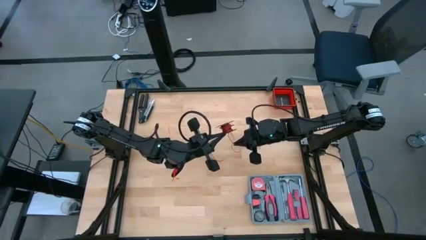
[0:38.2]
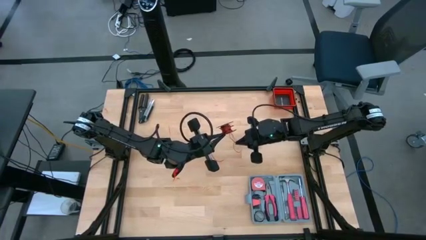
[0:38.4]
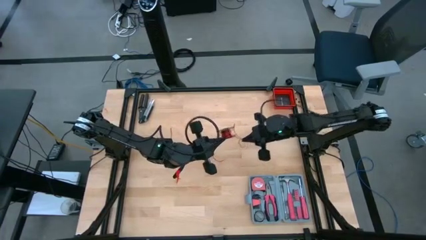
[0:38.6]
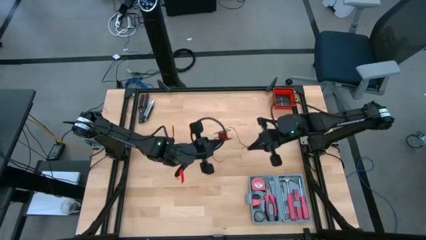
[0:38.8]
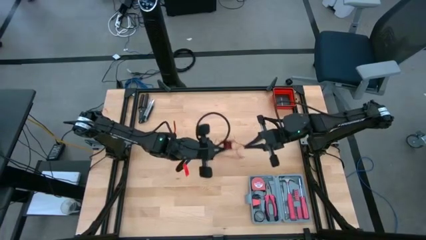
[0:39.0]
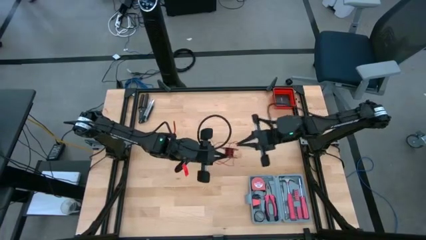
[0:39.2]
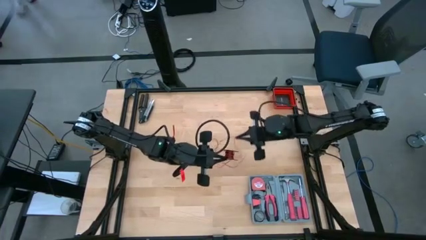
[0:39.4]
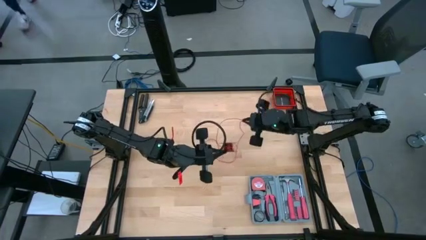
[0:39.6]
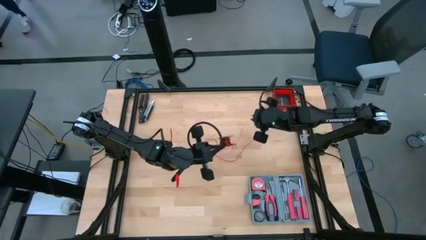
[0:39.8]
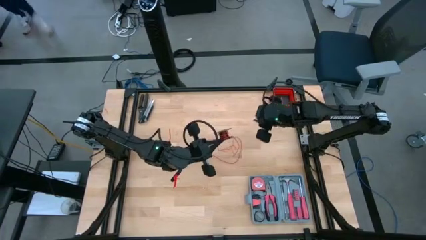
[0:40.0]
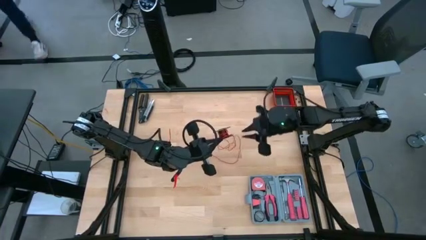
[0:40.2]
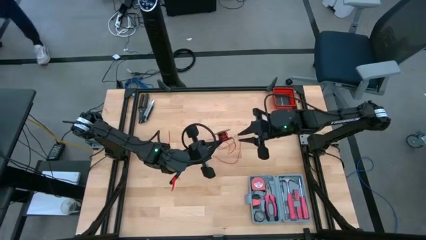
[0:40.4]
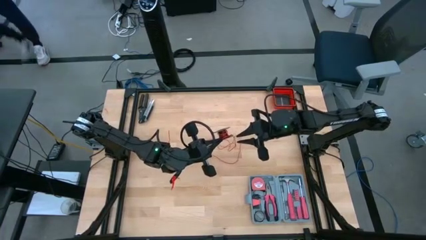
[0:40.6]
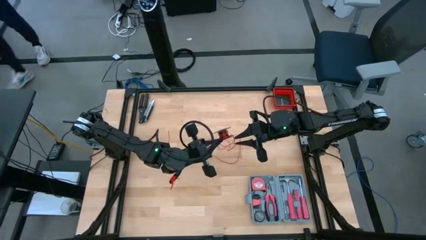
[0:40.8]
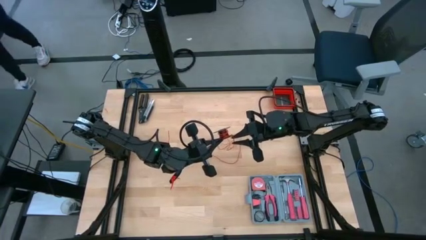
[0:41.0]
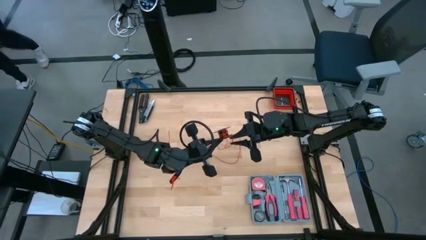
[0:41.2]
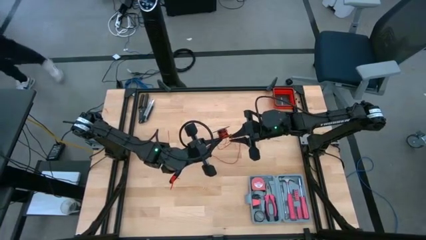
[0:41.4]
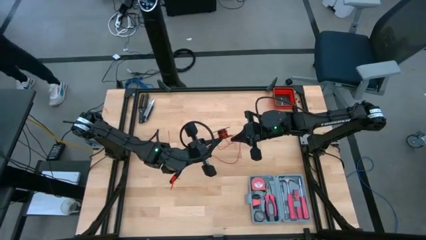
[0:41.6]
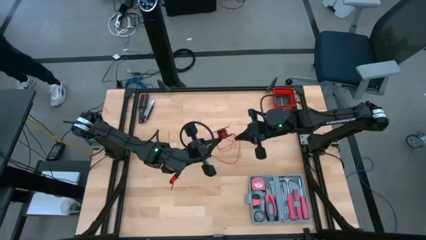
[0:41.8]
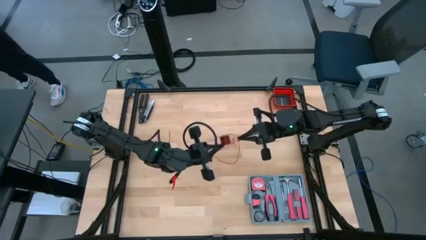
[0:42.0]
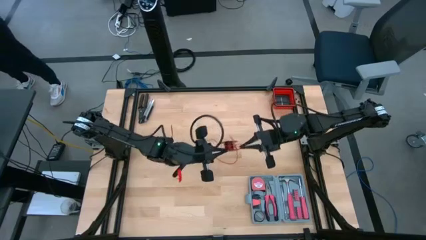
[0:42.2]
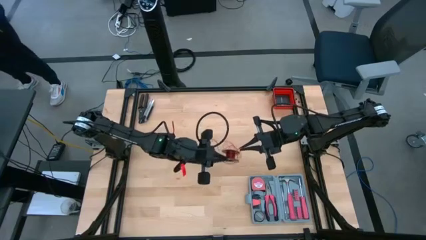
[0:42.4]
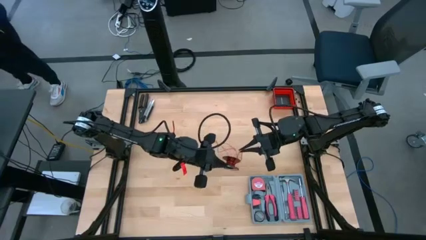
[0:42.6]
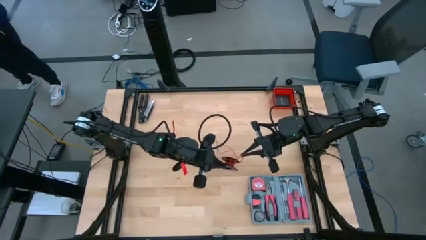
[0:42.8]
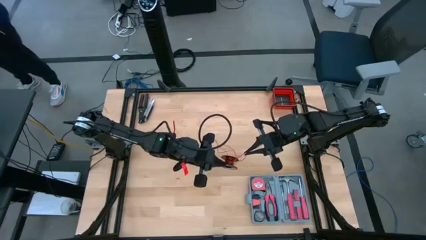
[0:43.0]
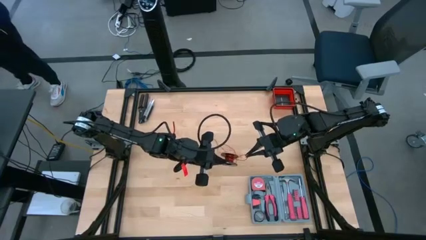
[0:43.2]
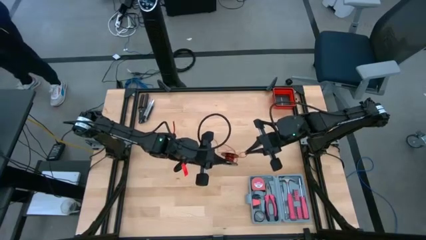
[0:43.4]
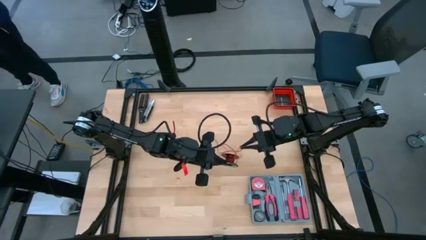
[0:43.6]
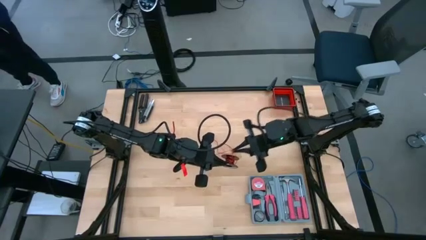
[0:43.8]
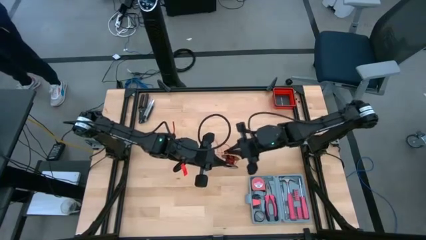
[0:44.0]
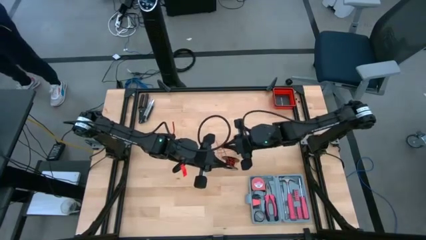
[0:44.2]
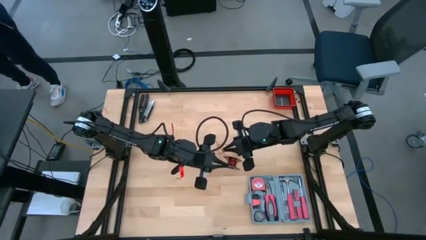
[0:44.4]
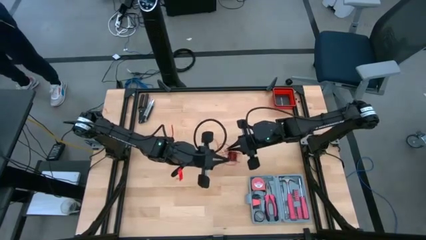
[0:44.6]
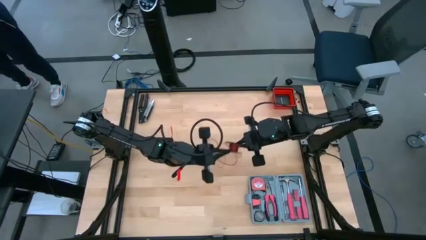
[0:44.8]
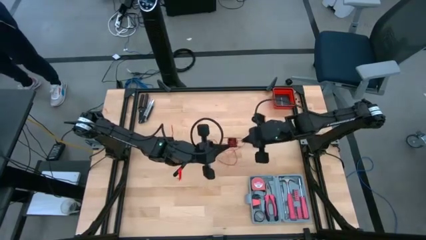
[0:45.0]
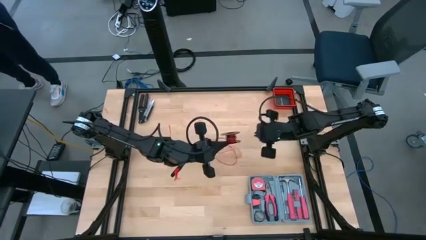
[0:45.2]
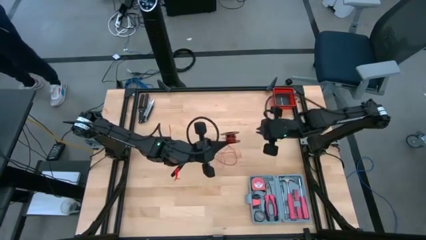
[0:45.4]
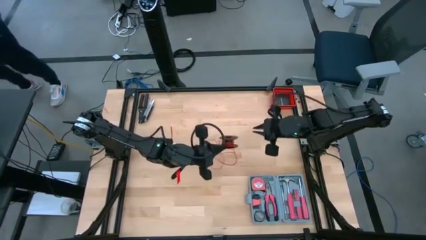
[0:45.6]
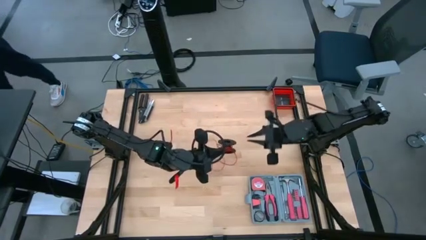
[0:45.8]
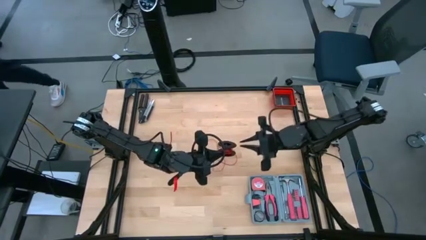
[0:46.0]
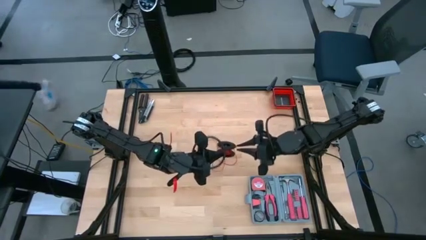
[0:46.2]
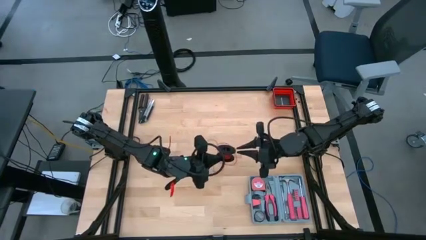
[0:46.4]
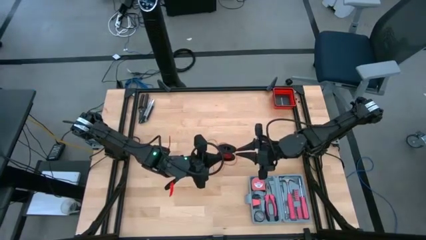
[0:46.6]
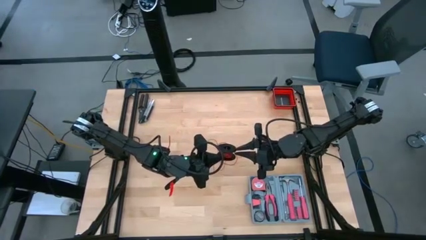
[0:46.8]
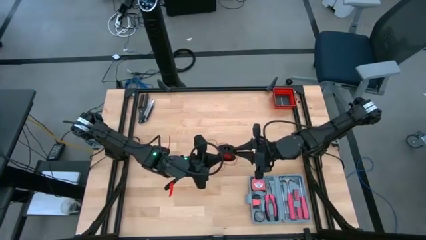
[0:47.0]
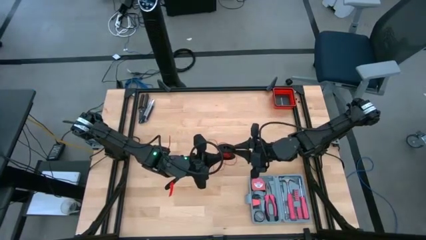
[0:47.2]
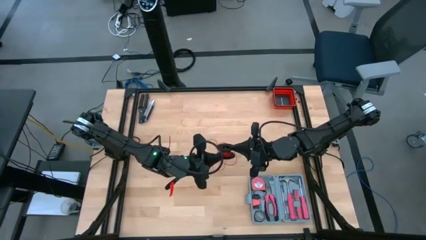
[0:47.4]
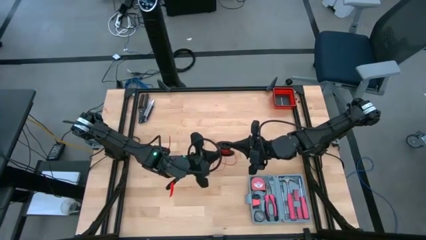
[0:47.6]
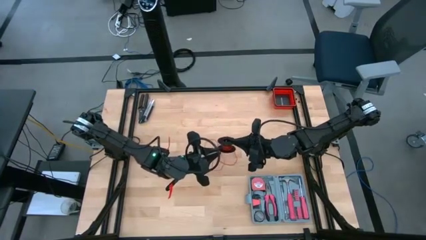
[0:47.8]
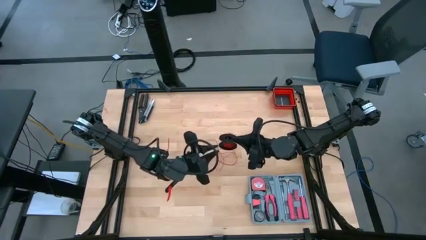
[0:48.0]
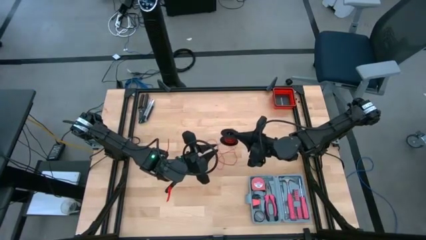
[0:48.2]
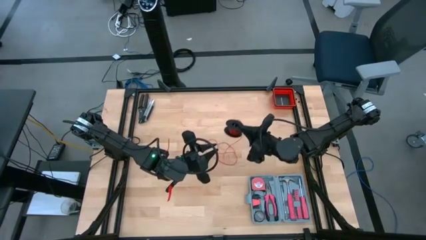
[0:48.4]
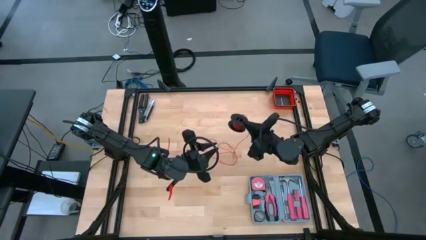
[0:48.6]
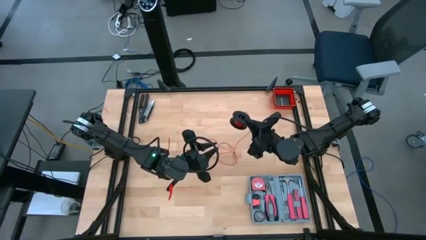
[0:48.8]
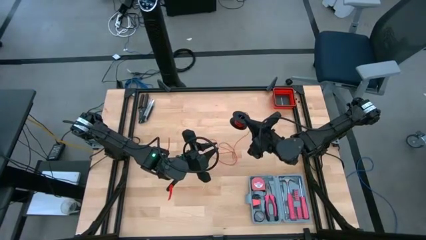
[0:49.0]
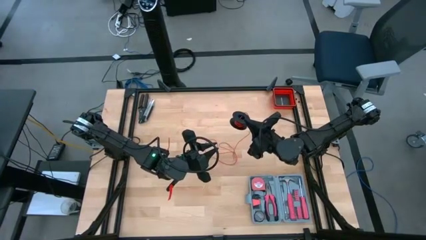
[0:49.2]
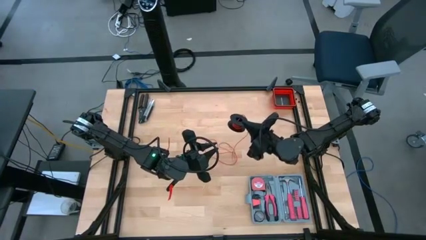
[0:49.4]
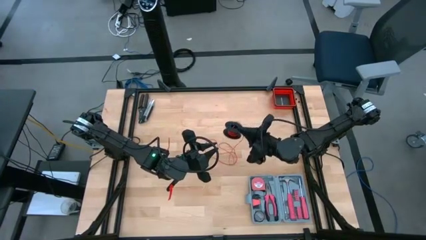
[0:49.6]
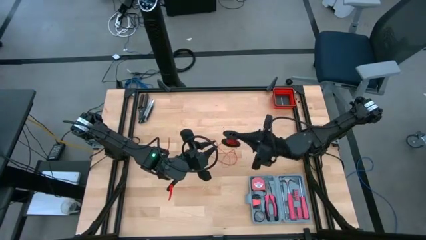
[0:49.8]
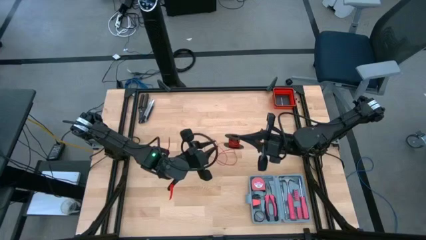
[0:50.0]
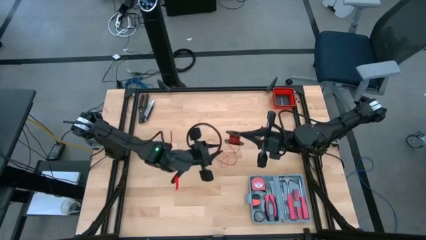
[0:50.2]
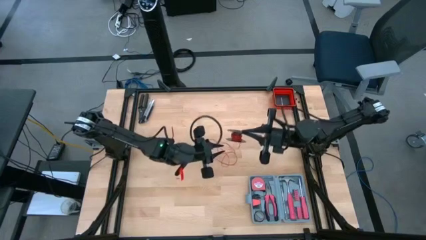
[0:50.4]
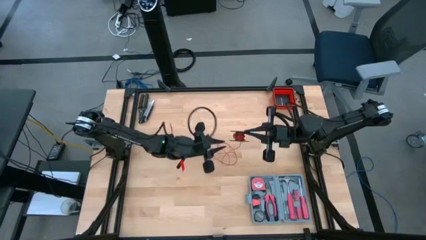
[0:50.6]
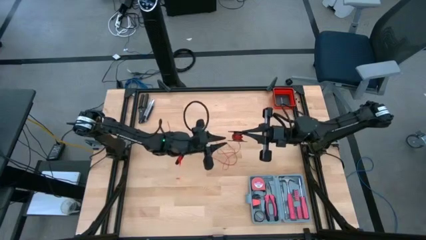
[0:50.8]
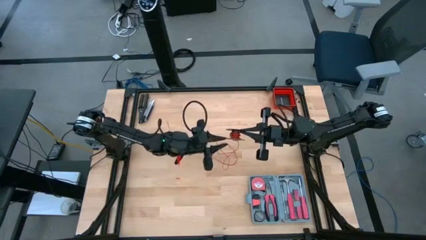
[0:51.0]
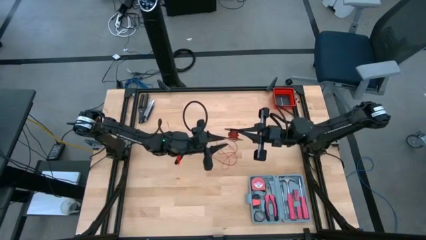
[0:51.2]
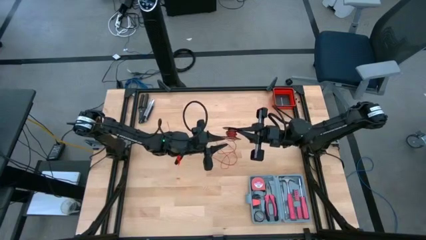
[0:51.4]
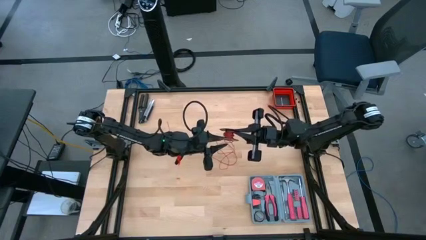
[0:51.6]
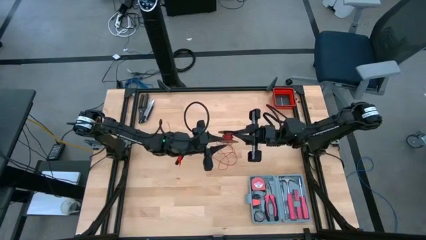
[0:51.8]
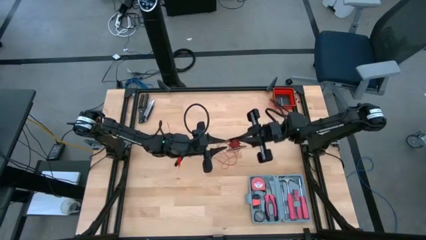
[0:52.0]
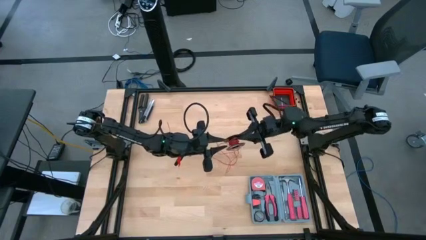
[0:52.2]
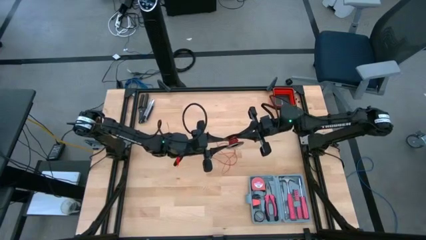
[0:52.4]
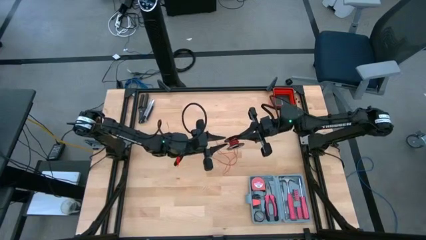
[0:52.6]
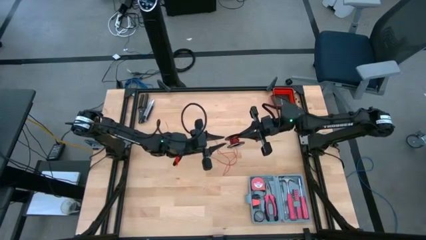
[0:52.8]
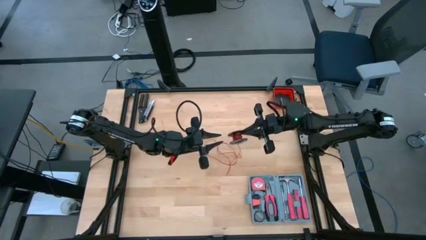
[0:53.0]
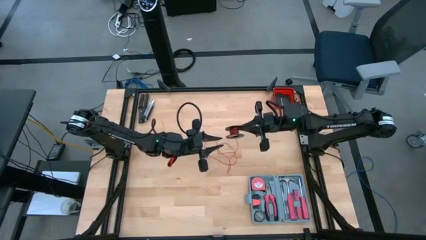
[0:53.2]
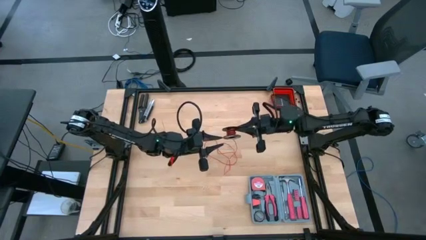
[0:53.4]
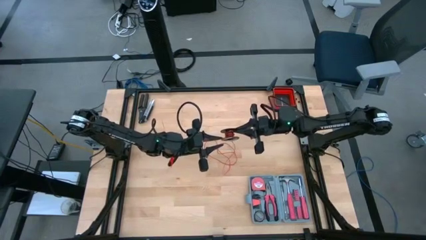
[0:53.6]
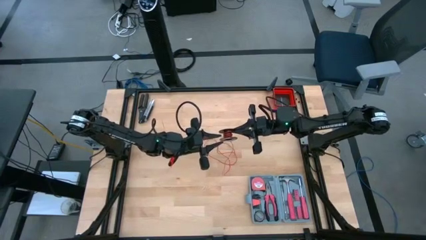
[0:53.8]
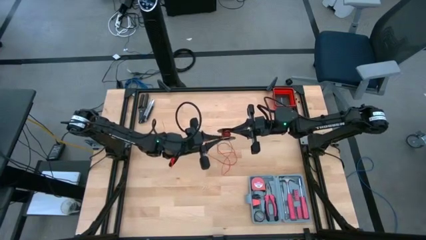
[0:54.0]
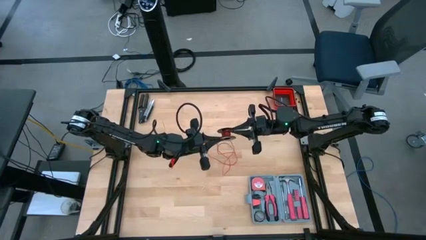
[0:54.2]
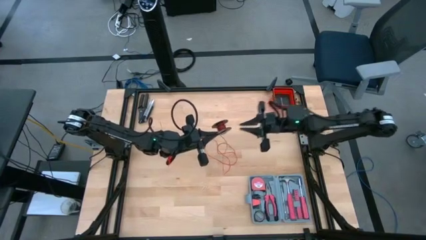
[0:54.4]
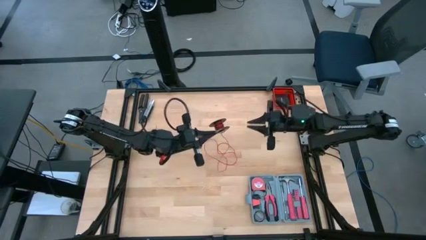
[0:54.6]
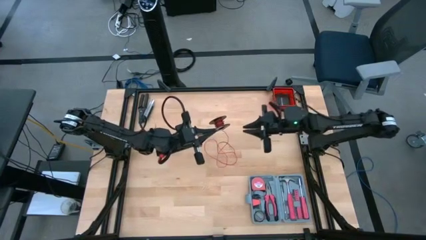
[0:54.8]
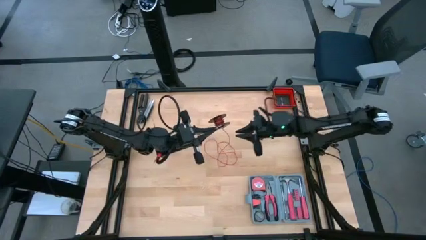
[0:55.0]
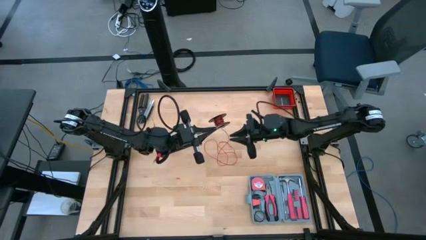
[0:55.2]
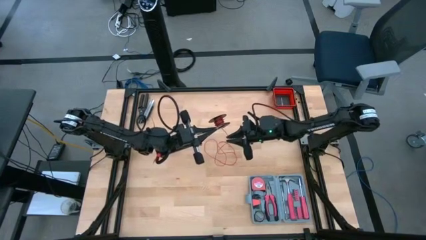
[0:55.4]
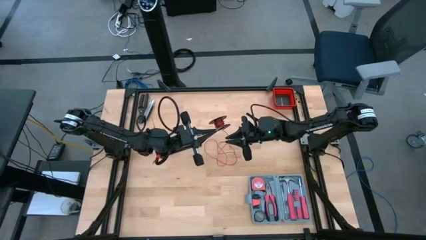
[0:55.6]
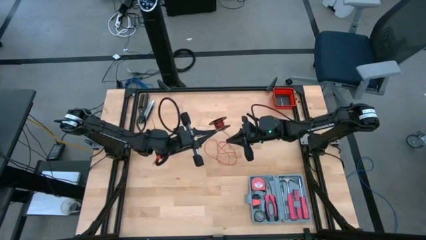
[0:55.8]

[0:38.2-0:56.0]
Task: Coil cords
Uncoil the wire
